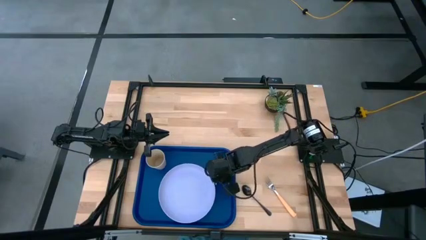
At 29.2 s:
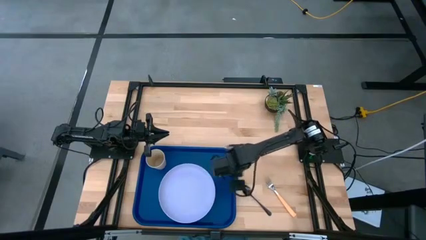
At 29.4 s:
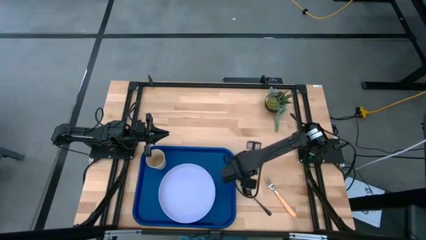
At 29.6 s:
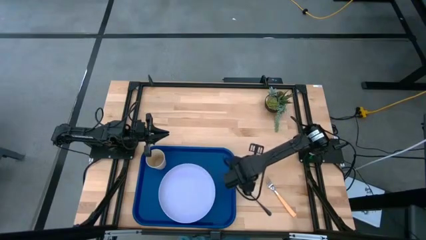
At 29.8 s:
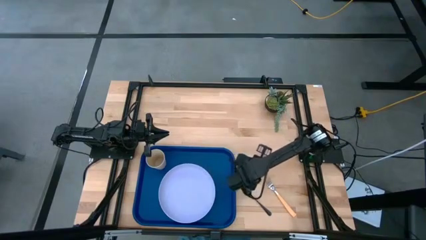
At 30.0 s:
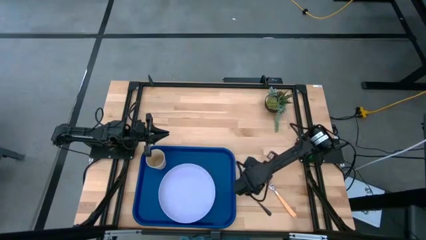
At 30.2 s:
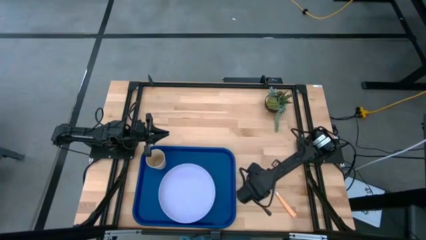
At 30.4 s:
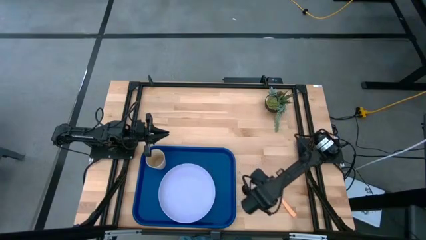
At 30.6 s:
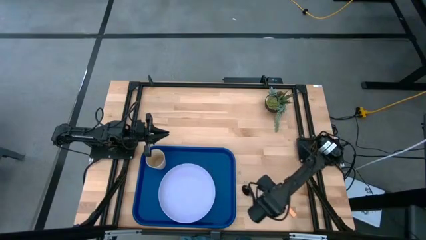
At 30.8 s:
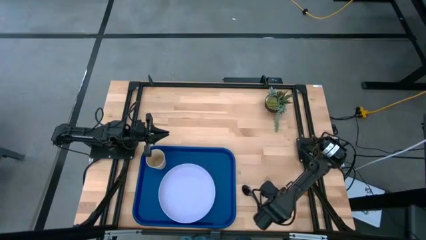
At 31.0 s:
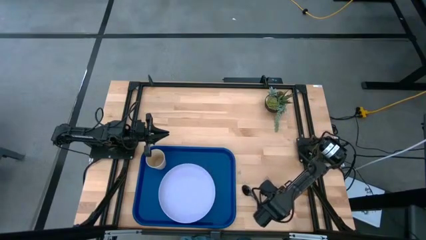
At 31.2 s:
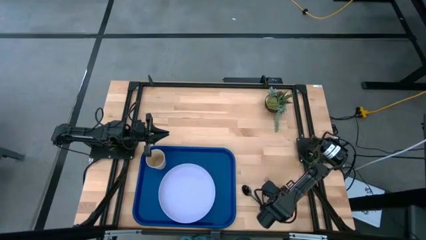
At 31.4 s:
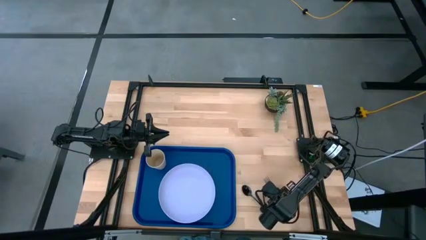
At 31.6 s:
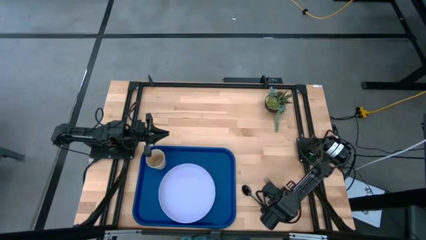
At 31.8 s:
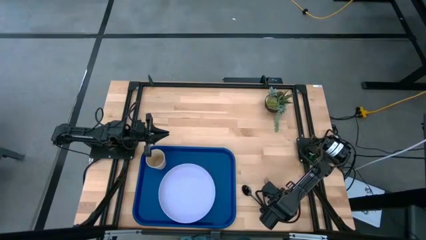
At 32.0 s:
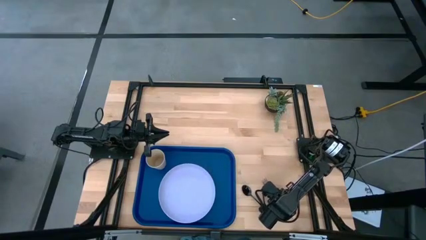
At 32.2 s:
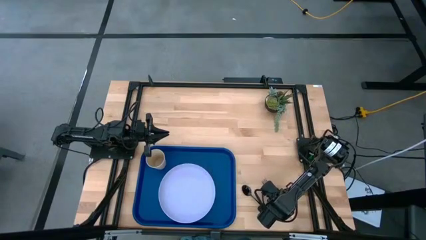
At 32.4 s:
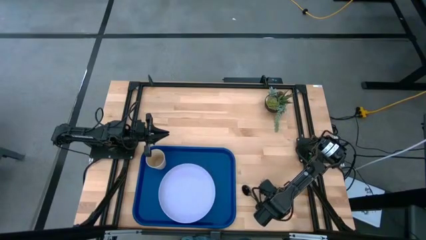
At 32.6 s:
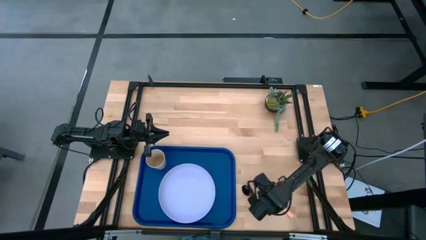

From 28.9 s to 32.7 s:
Task: Pick and place plate/cup/fork/spoon on tray
Put the orange fork to the right of the purple plate on the blue serving tray

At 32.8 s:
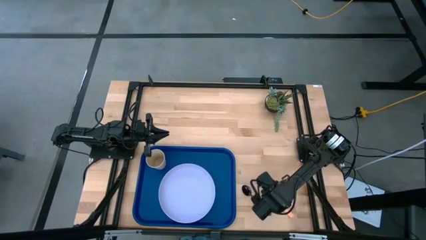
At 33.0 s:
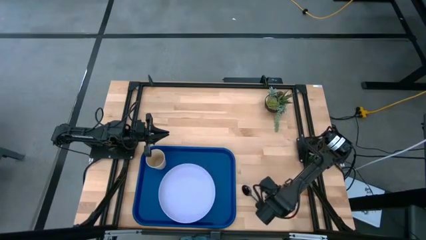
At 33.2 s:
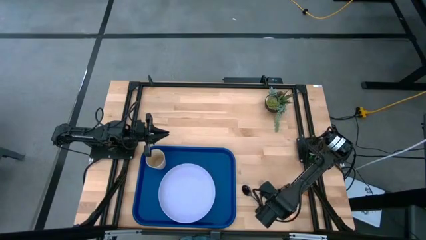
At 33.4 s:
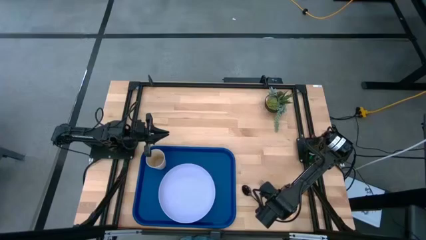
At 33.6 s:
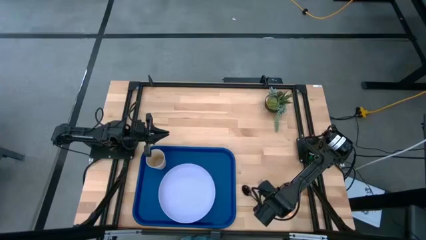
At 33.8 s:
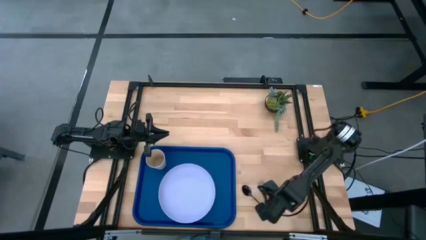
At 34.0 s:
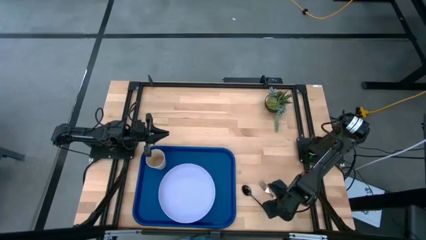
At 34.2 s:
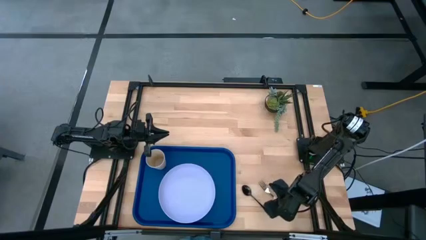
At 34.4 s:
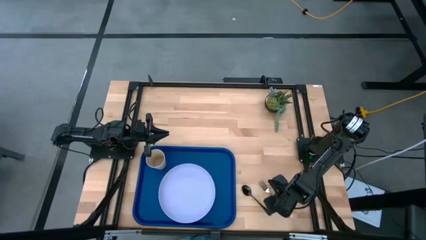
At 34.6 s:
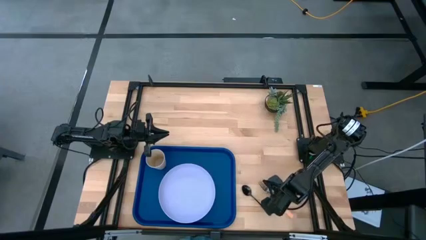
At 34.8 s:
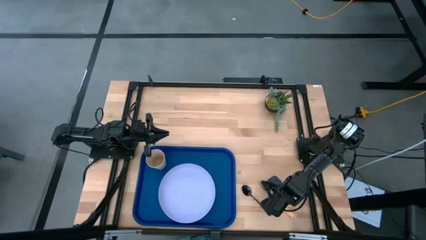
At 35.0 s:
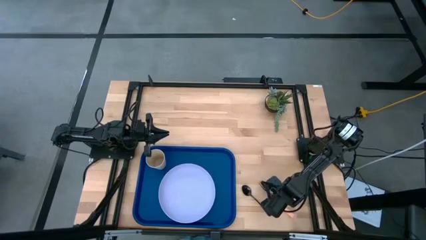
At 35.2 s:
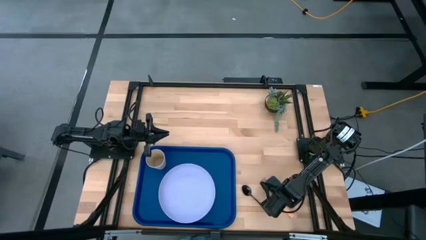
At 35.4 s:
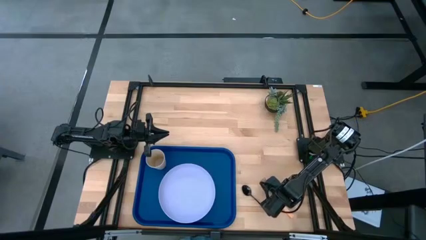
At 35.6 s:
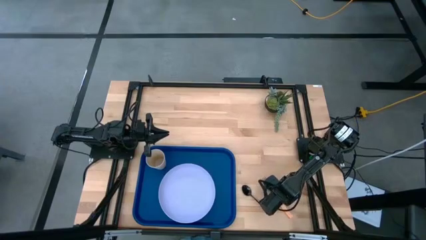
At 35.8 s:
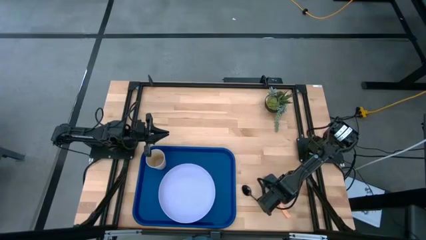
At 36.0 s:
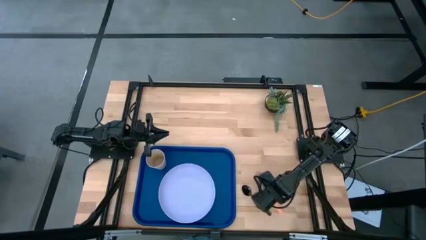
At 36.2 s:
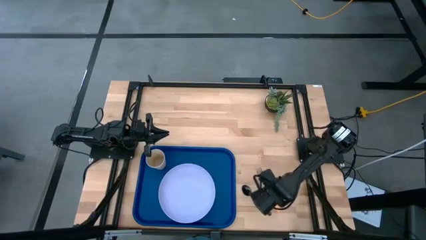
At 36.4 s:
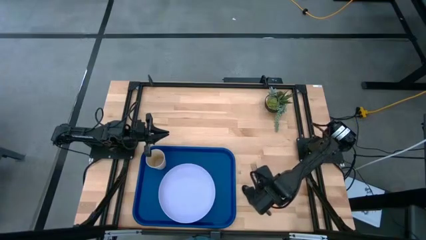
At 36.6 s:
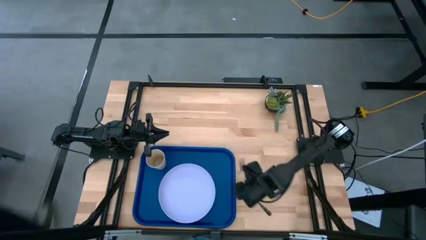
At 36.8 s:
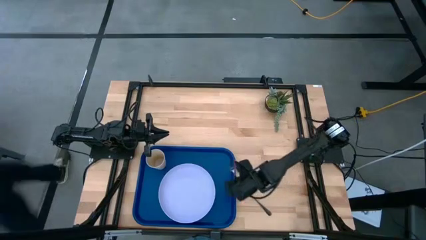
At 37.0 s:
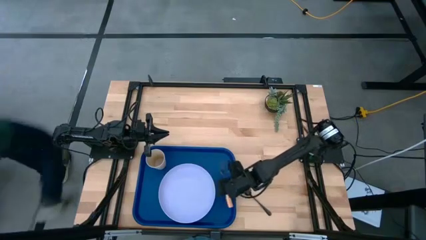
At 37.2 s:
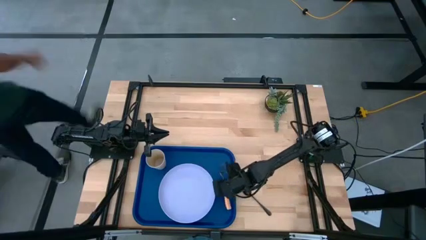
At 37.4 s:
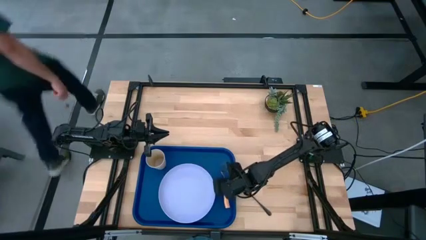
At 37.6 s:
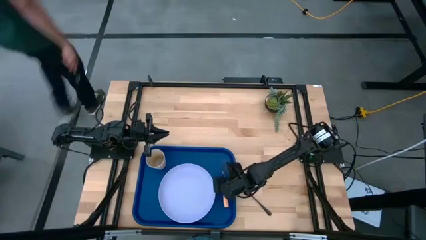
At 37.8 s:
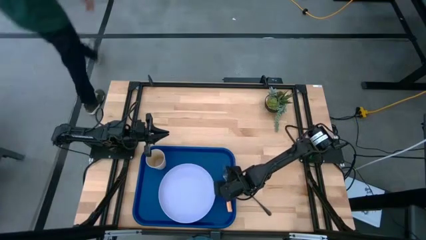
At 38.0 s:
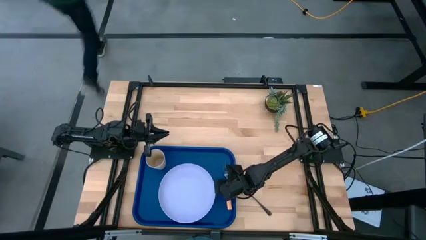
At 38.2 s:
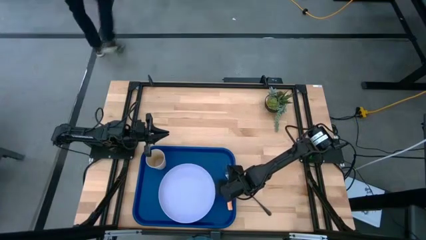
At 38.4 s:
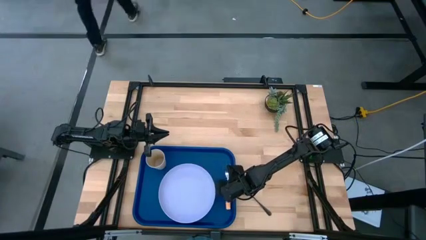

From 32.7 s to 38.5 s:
Put the orange fork on the blue serving tray to the right of the purple plate

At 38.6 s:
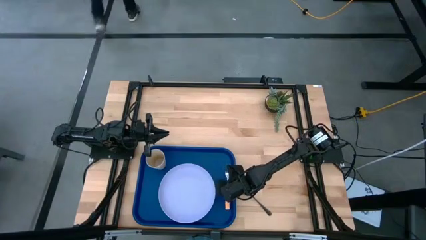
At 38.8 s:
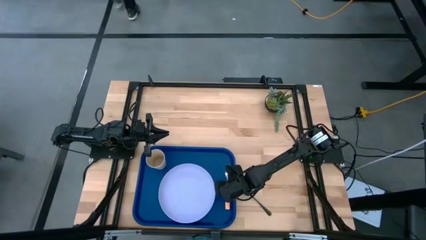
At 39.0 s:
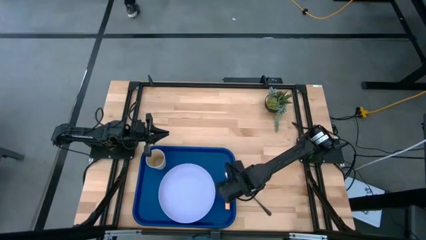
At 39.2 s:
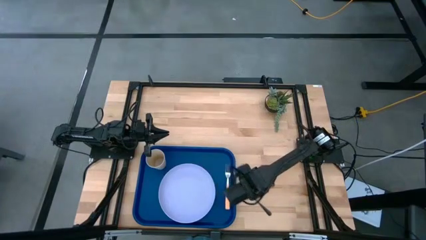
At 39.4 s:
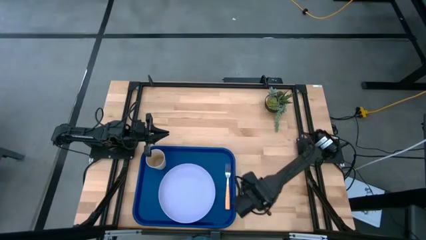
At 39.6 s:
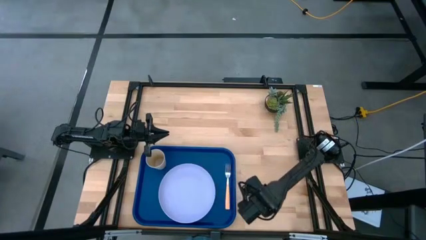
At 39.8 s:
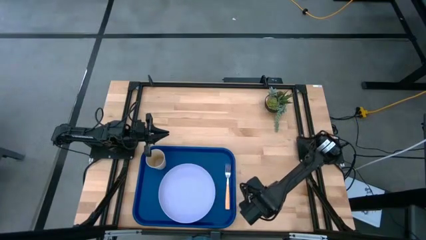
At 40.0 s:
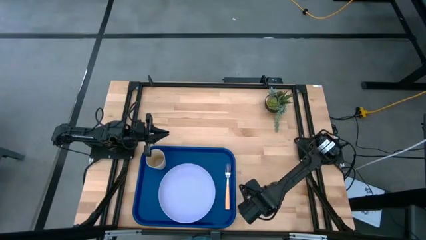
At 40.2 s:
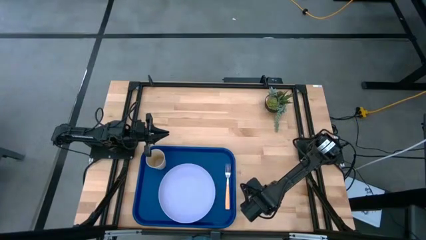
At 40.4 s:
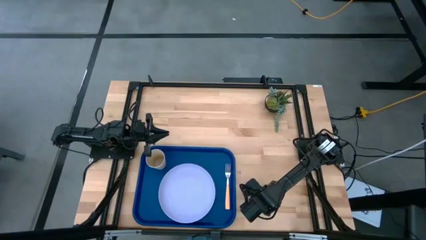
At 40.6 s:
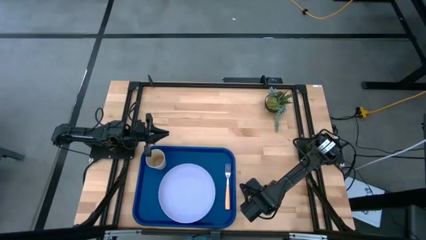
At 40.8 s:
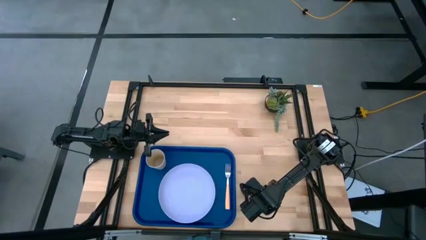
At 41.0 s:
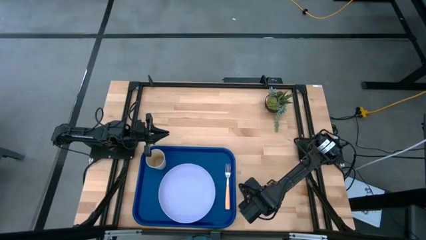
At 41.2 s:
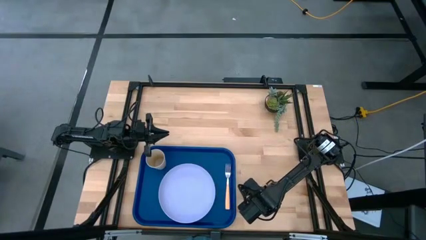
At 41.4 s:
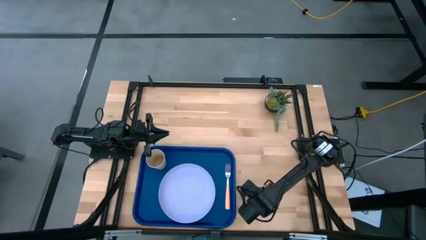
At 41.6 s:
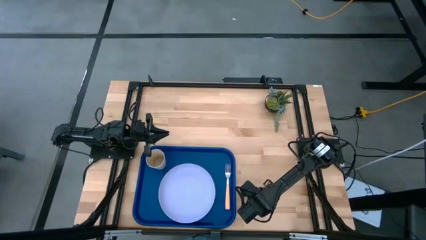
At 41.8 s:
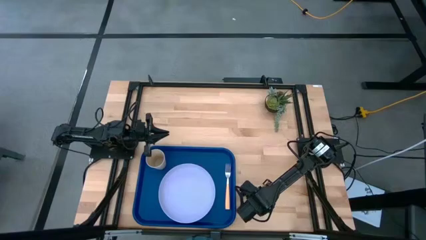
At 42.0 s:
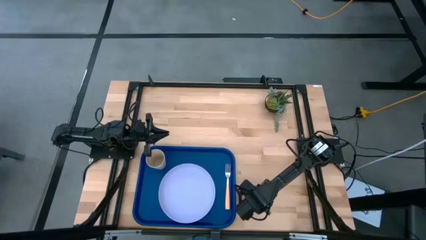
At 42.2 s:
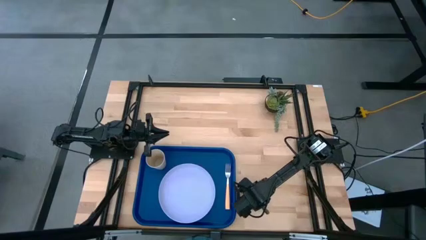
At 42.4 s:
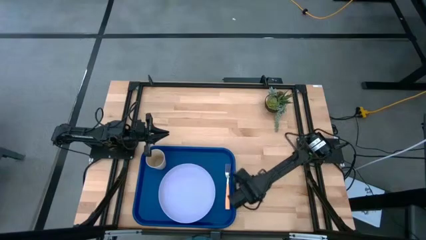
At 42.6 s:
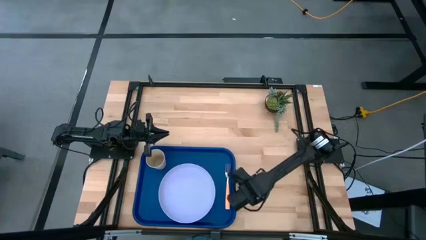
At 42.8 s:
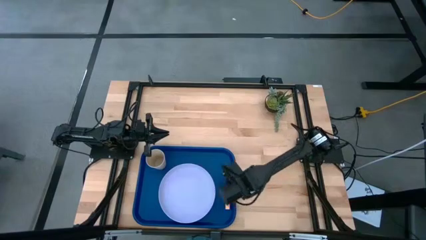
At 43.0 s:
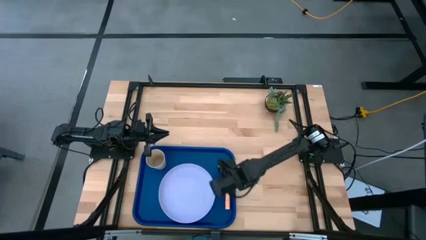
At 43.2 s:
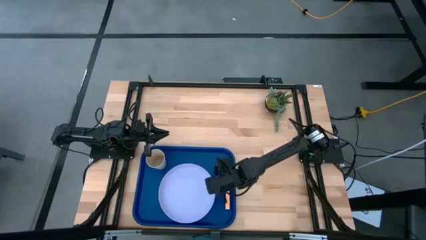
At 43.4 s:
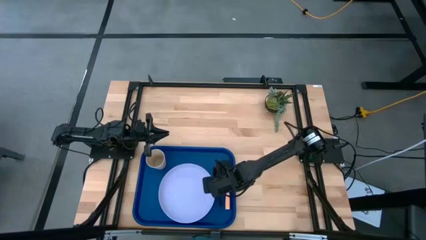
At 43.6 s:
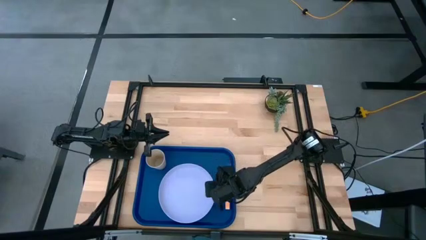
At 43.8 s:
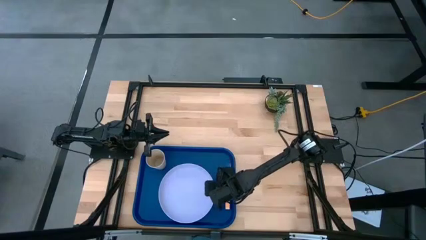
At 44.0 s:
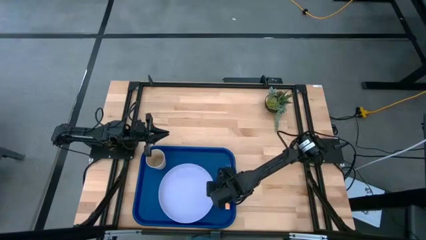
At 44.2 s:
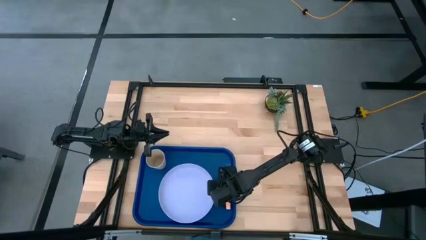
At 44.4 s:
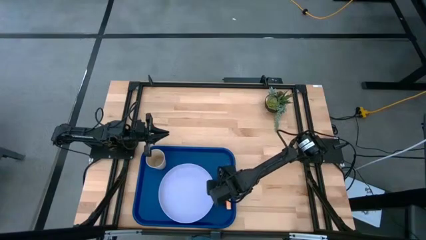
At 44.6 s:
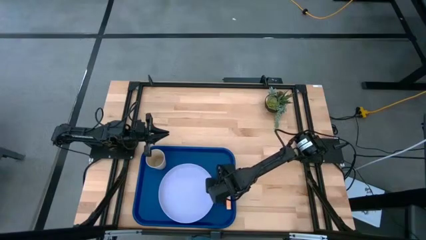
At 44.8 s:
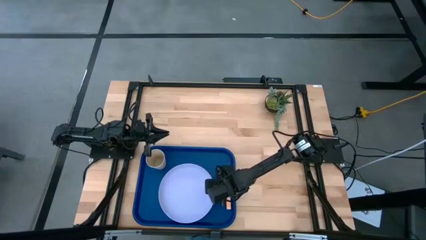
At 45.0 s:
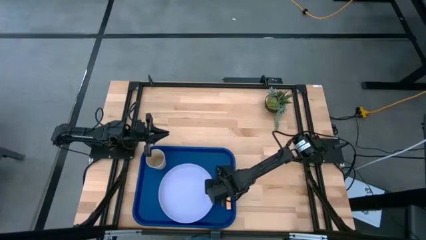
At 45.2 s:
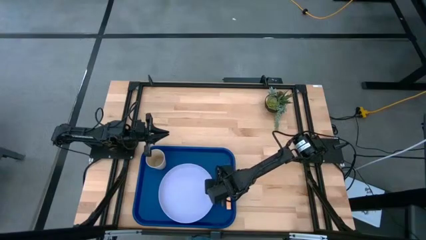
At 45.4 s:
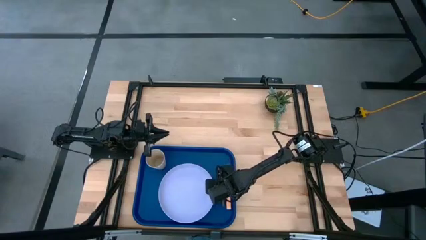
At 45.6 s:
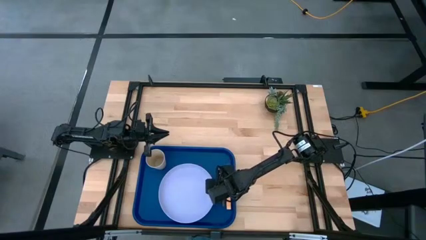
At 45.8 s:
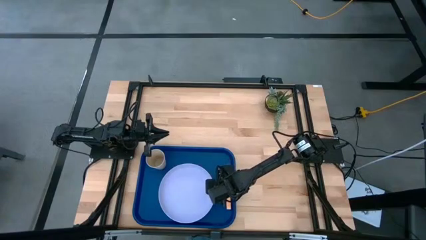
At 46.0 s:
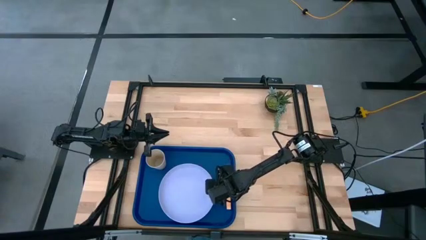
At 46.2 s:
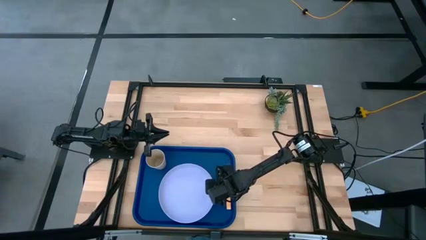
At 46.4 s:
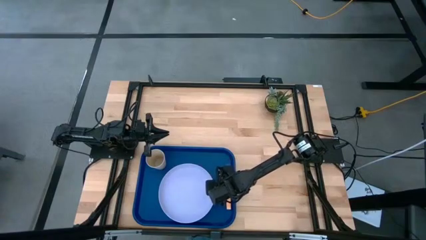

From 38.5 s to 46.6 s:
Put the black spoon on the blue serving tray between the purple plate and orange fork
